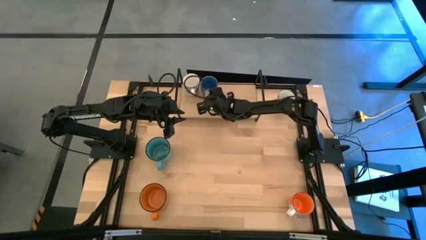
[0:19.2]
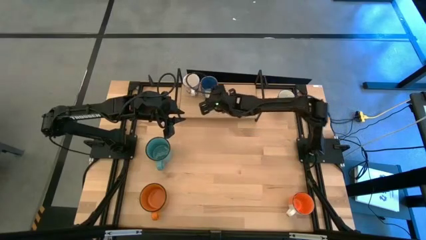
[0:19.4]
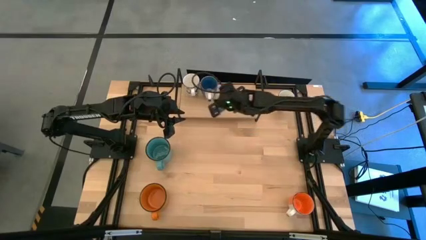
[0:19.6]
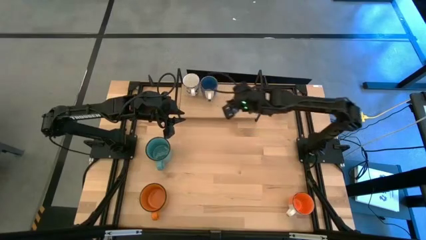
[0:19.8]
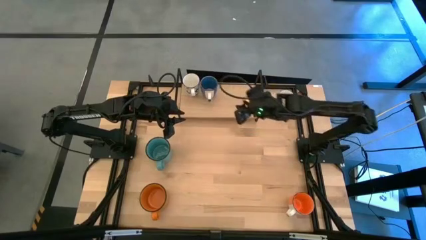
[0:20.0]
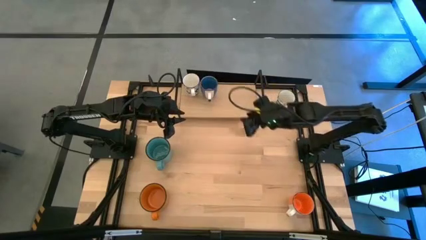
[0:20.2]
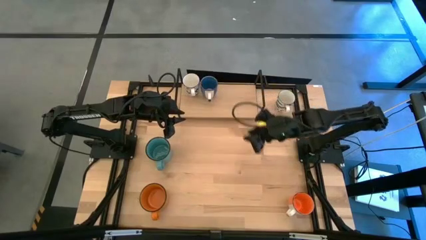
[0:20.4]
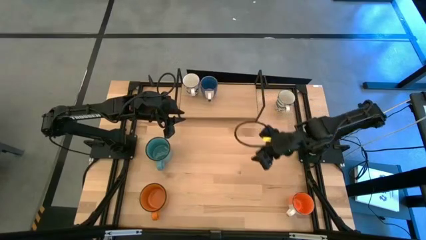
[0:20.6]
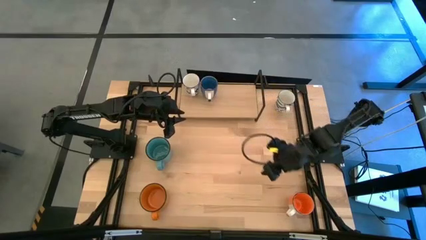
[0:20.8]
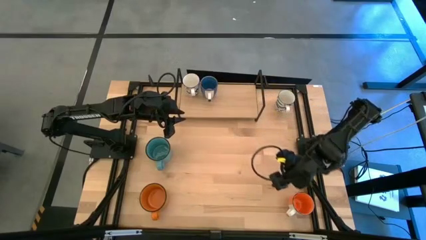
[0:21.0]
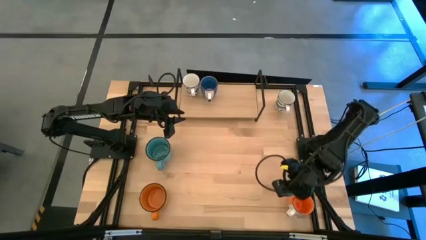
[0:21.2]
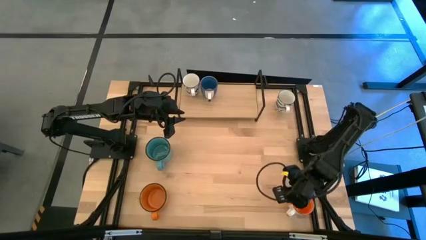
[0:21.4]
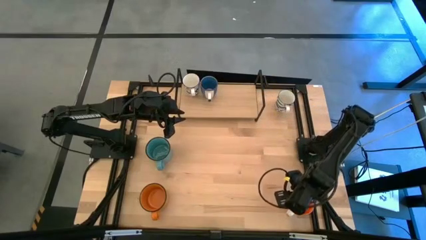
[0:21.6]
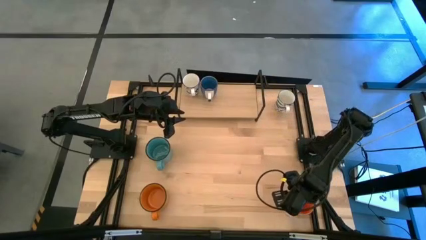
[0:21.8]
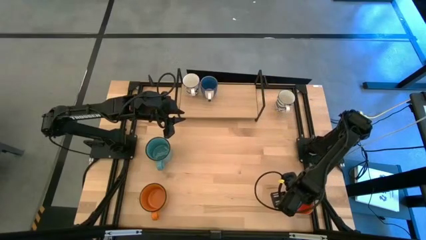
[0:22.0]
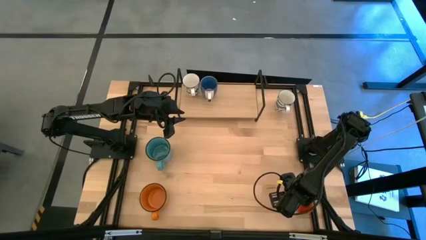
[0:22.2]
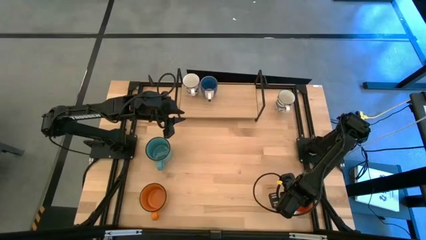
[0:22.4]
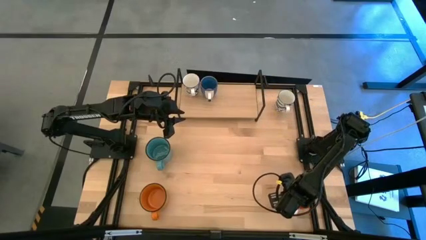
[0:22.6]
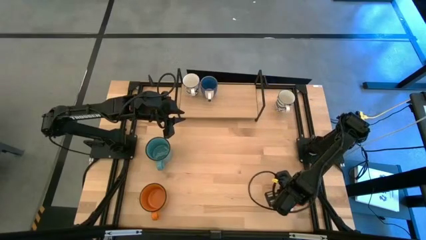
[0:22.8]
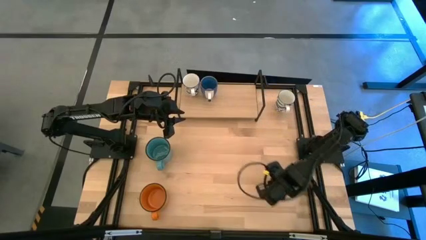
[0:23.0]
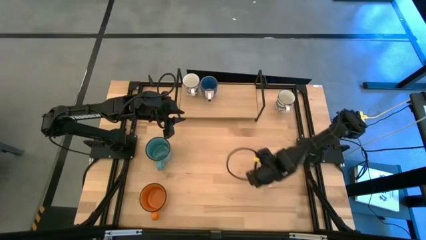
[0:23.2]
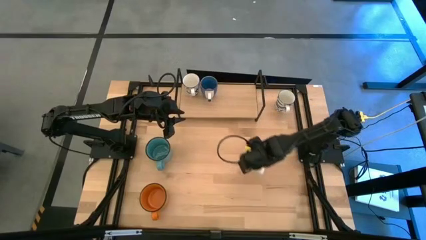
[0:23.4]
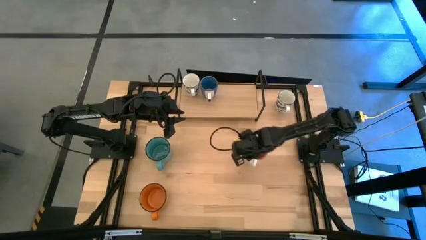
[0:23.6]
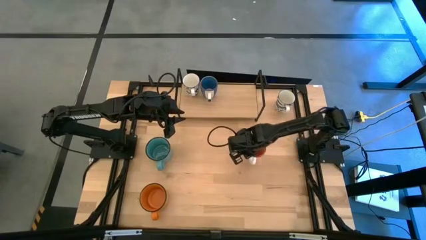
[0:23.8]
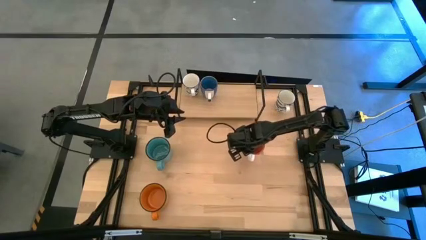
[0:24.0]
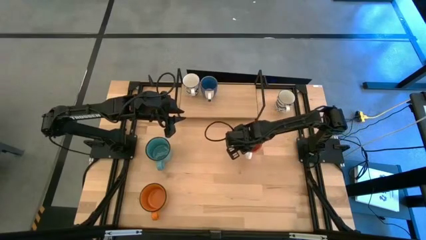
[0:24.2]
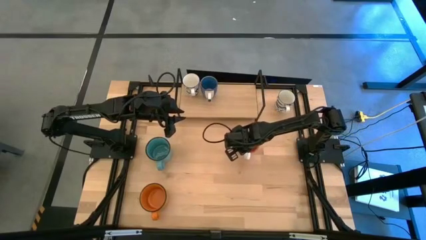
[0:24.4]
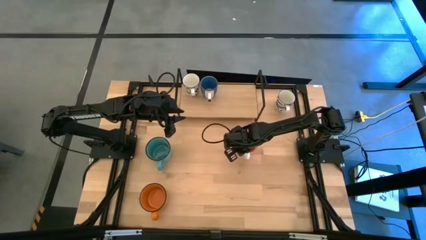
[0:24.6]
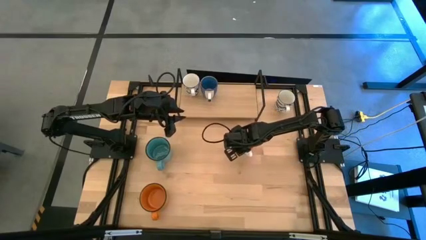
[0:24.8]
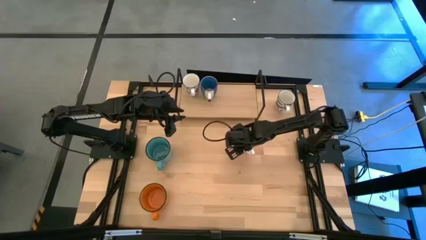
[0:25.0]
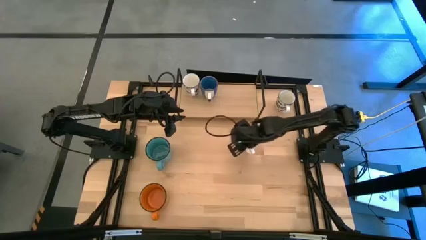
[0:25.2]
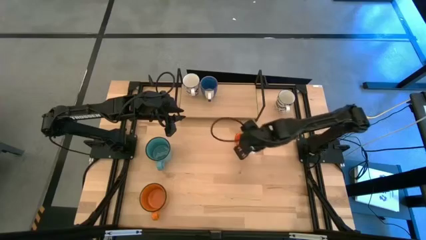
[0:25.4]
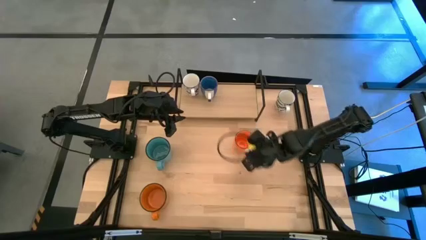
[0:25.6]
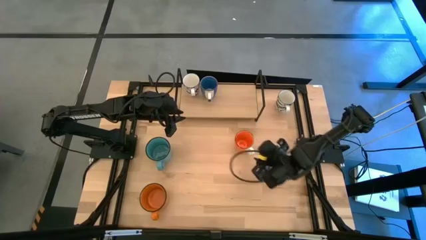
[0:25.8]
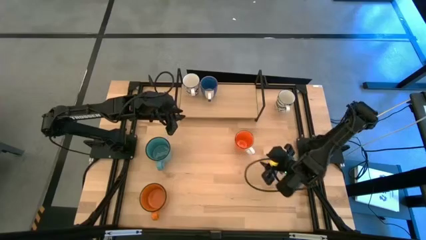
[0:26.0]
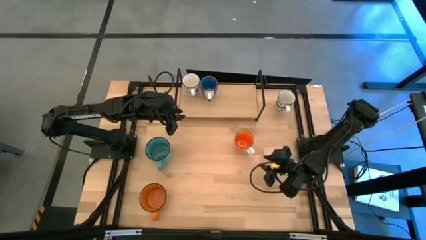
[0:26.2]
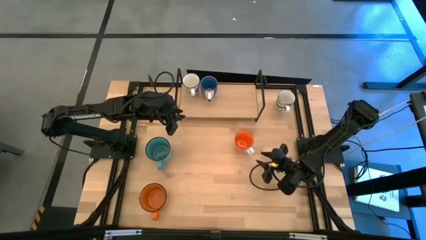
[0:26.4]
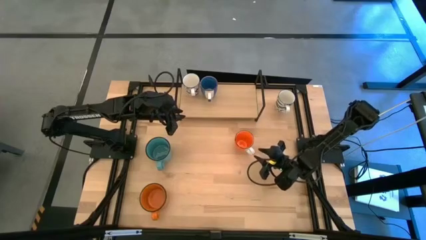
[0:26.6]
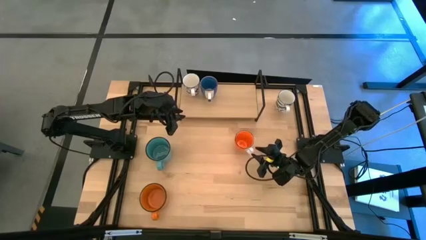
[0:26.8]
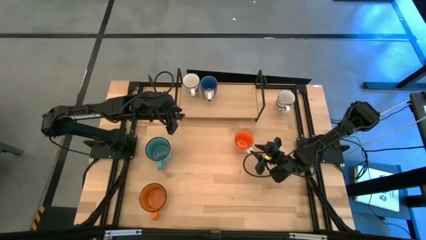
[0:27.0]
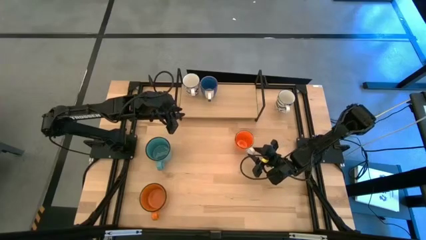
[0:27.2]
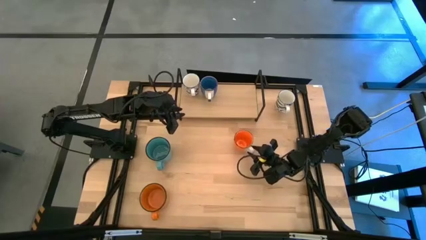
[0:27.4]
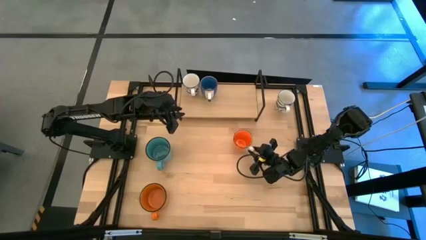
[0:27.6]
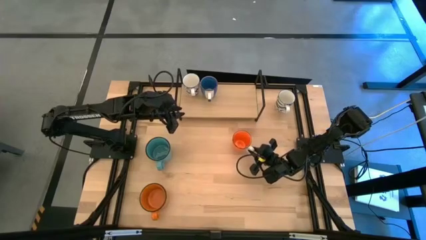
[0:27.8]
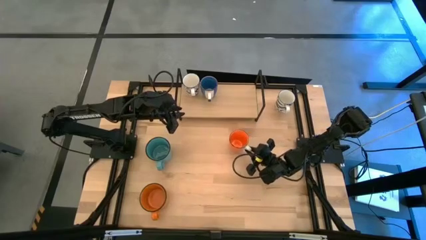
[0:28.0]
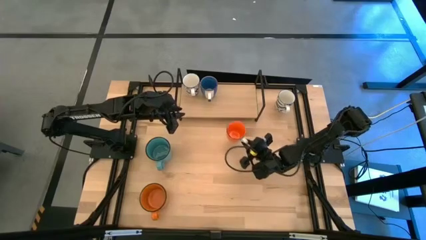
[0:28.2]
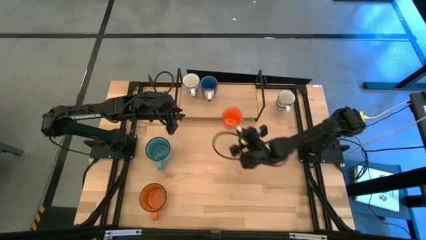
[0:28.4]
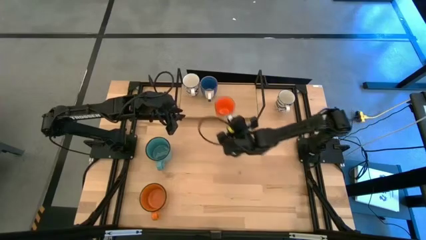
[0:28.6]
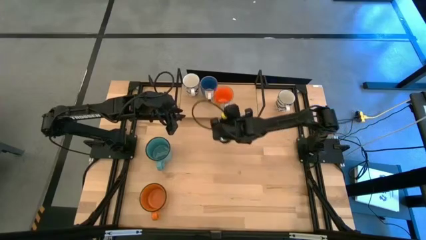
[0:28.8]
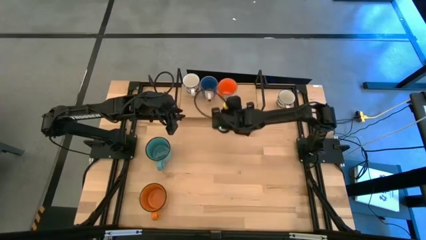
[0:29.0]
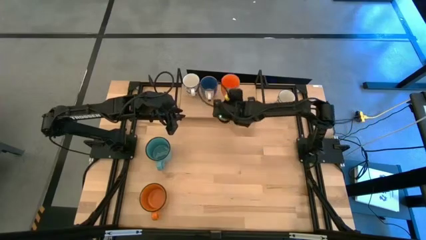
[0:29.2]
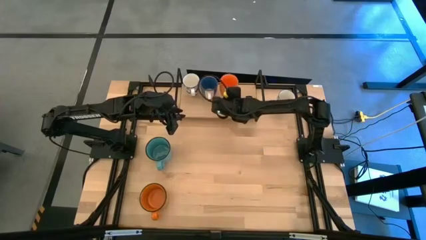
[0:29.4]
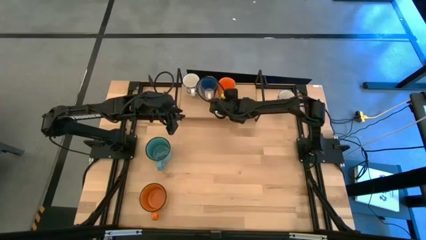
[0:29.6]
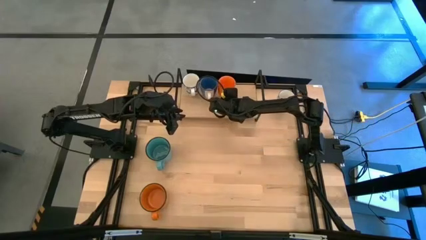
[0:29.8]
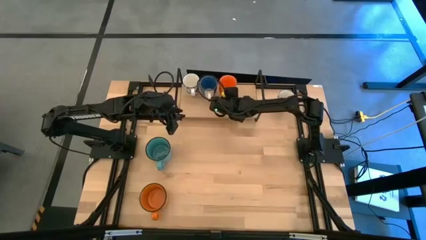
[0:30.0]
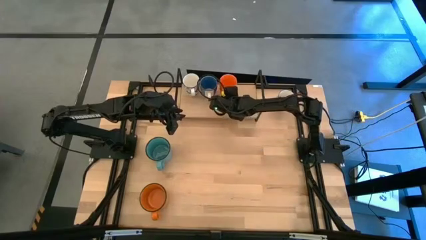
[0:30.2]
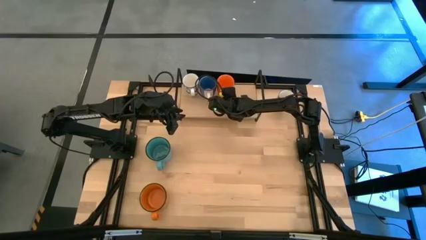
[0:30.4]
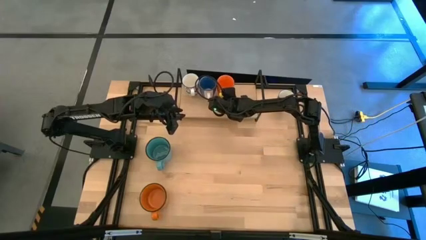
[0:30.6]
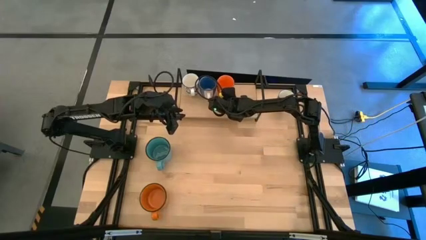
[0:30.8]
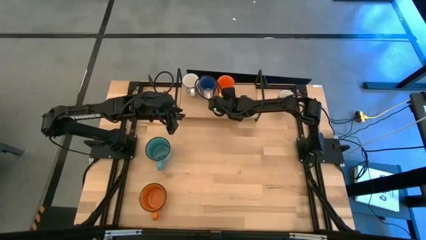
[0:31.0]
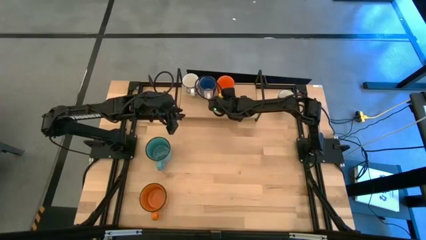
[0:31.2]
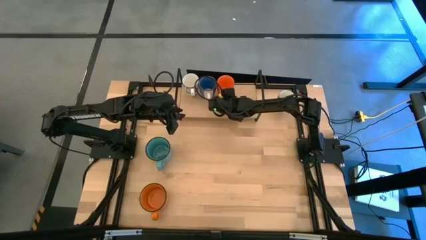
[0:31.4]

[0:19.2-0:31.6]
Task: Place coffee mugs
Put the right orange mug on the shelf

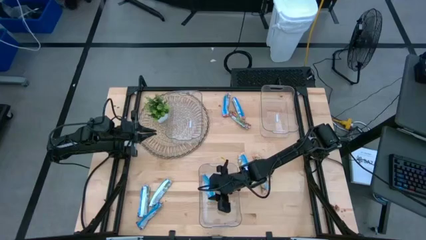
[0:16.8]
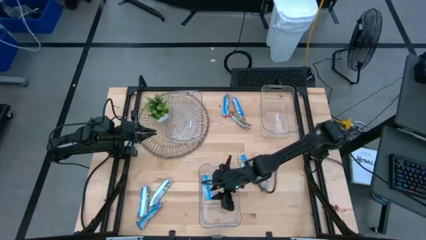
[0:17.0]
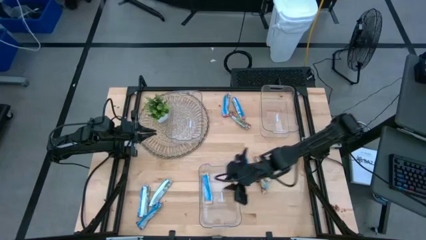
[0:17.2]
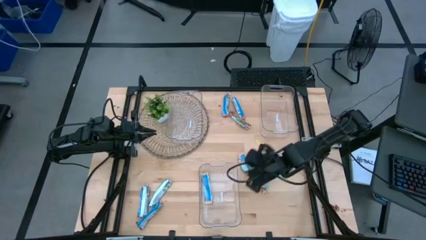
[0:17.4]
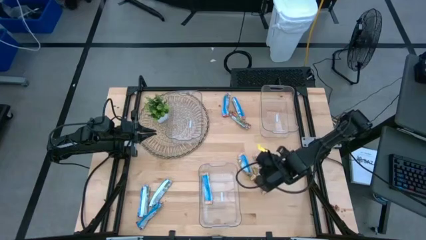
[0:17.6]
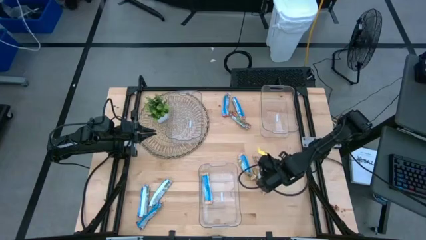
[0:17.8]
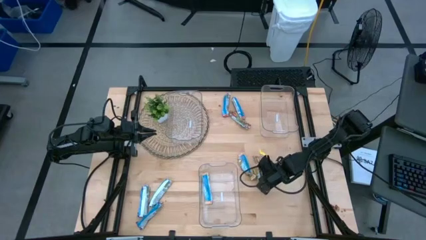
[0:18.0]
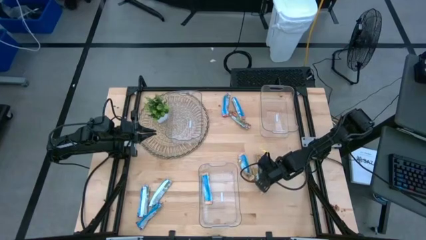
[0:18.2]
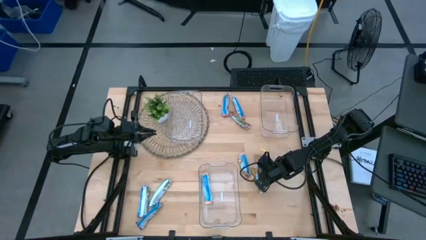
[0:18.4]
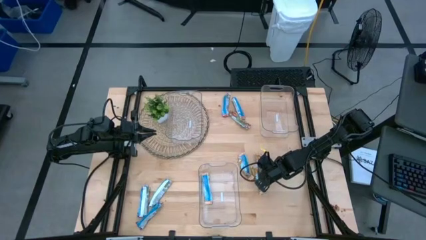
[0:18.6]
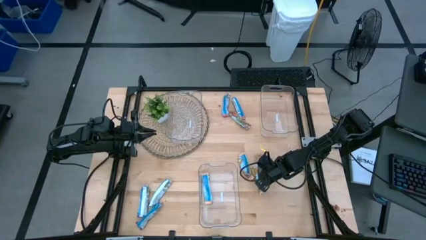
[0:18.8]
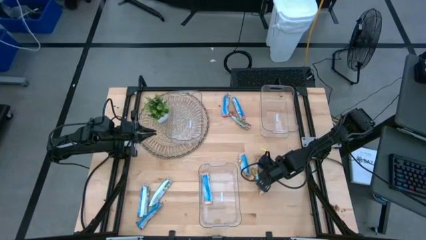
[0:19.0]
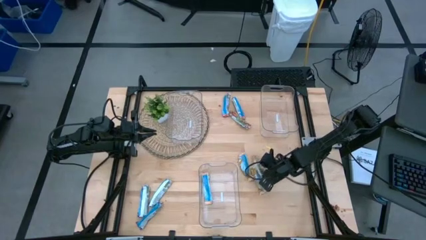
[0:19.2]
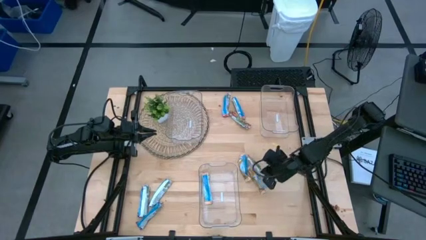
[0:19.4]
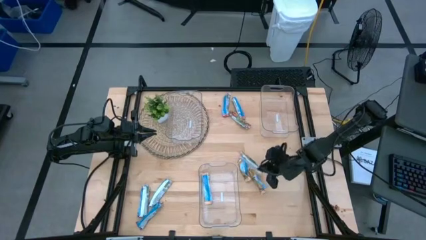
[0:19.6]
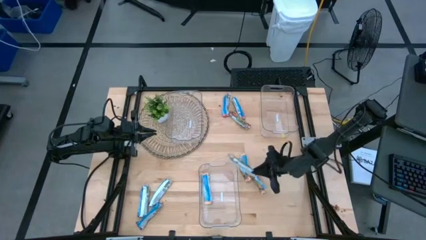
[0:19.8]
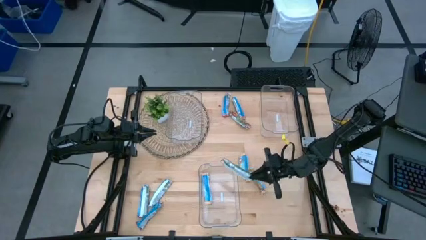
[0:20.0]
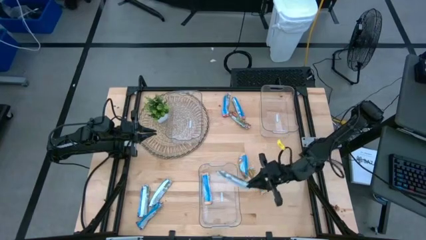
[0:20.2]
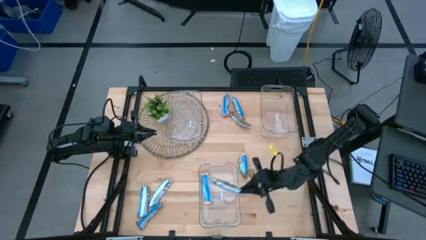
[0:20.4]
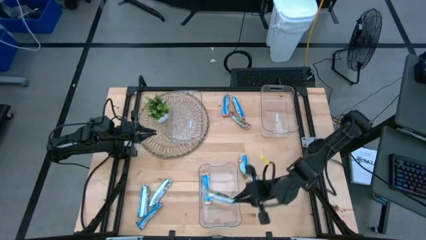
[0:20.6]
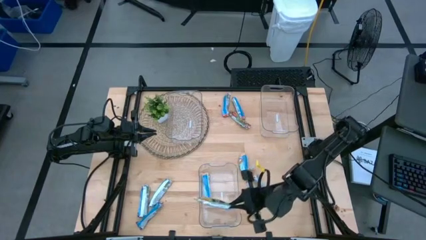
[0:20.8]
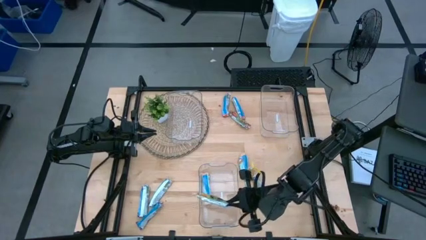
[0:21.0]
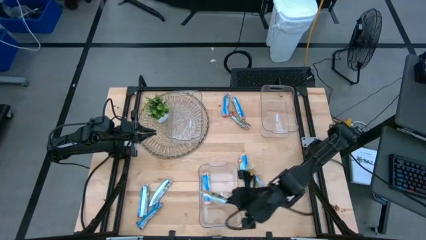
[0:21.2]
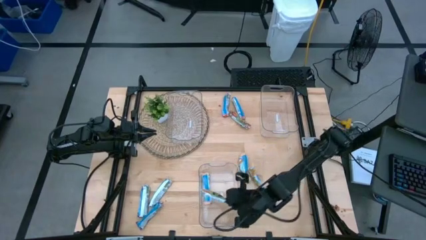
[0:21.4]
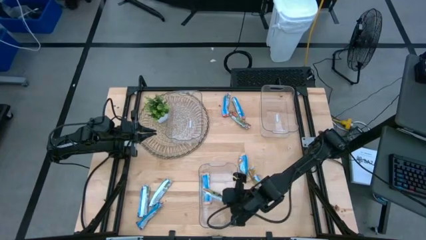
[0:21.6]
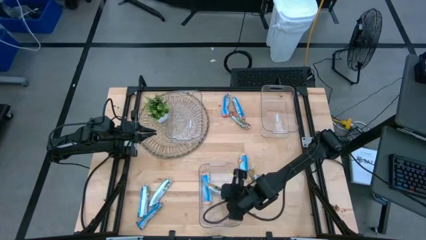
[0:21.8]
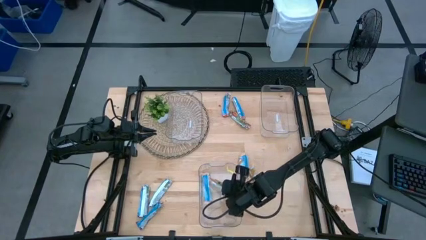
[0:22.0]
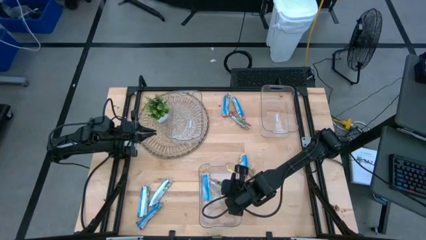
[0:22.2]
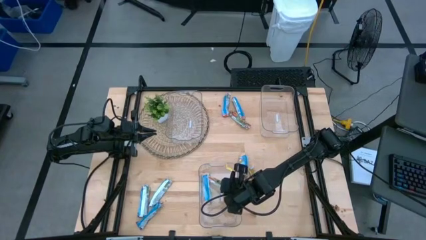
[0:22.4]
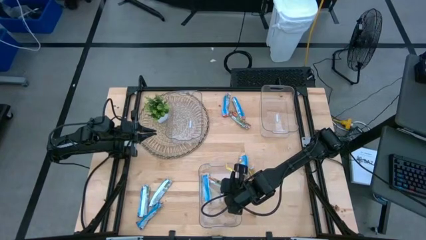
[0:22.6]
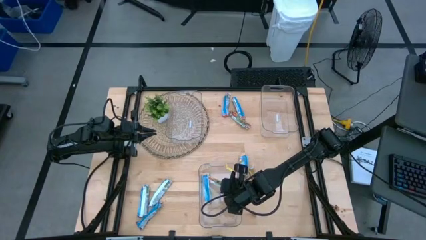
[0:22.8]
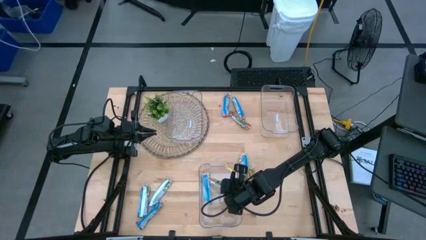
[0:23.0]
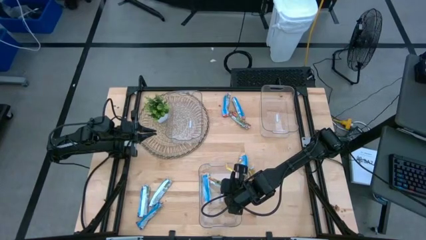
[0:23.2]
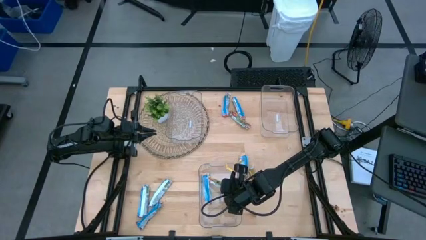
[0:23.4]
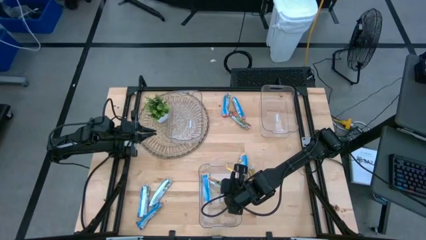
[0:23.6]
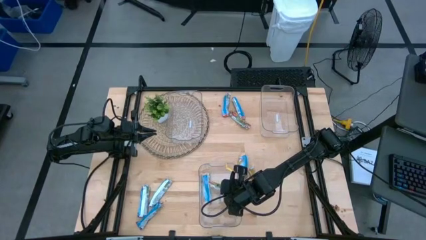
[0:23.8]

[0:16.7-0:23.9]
Task: Pick and place Granola Bars by type
Put the yellow granola bar into the bottom transparent bin
